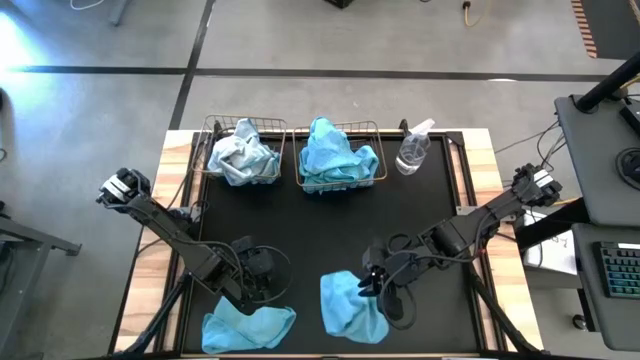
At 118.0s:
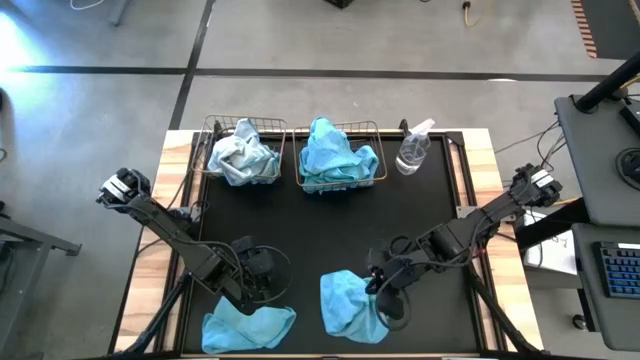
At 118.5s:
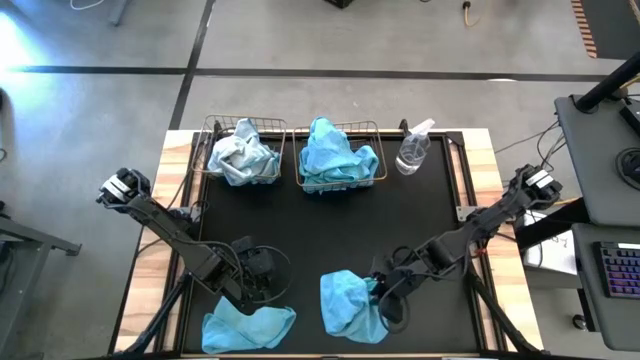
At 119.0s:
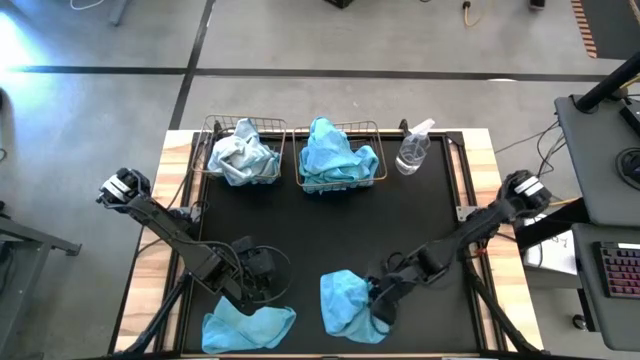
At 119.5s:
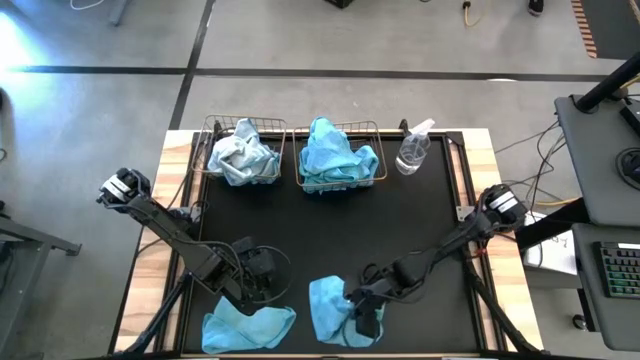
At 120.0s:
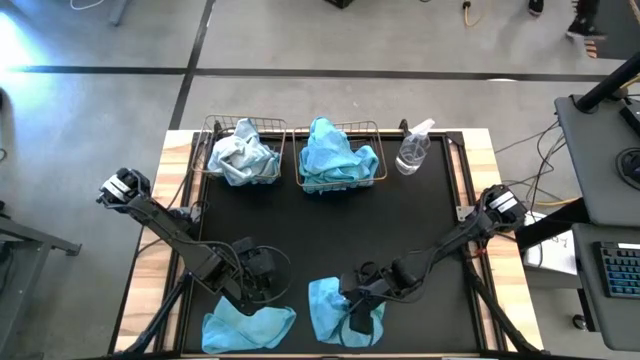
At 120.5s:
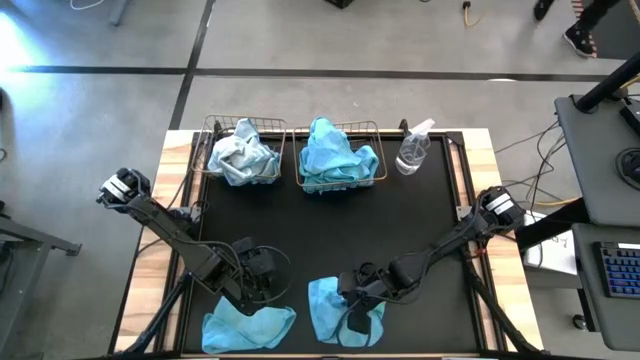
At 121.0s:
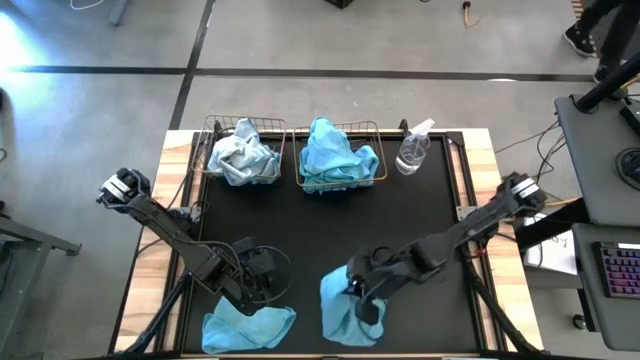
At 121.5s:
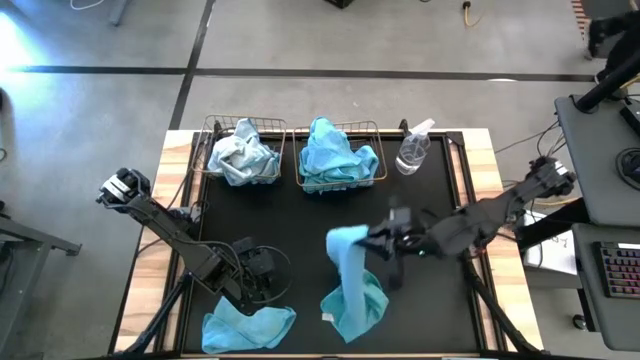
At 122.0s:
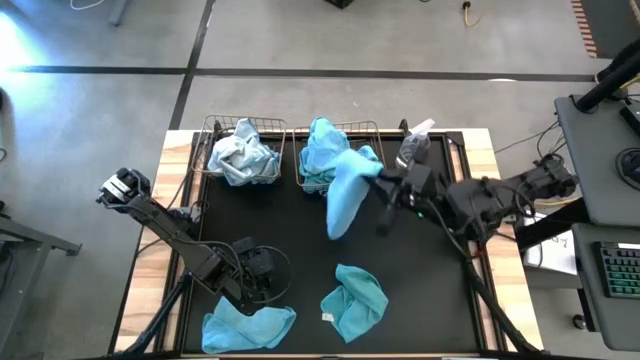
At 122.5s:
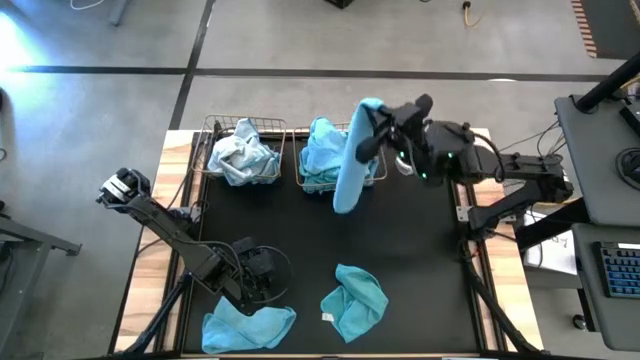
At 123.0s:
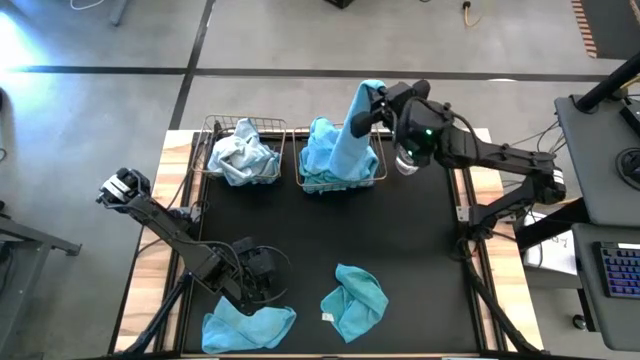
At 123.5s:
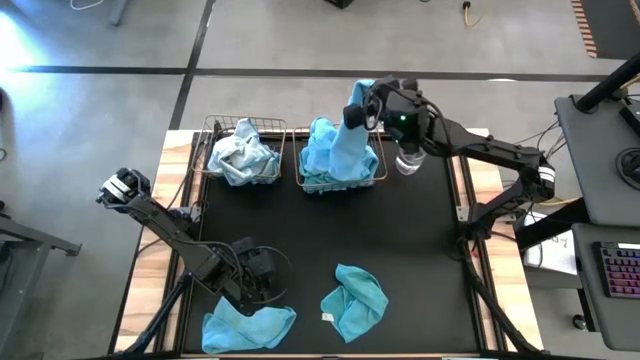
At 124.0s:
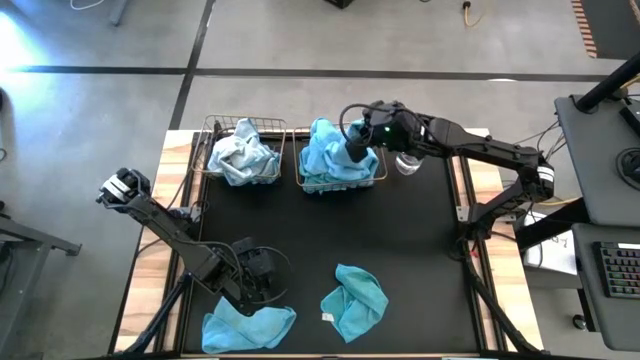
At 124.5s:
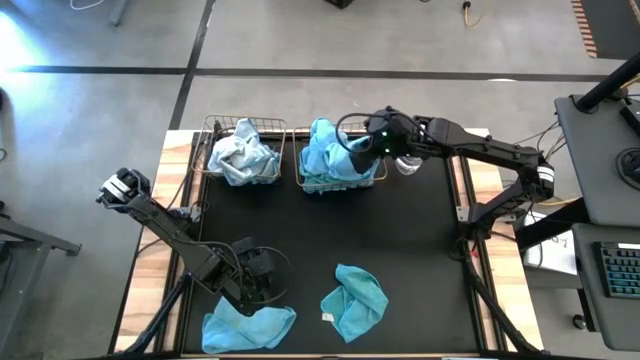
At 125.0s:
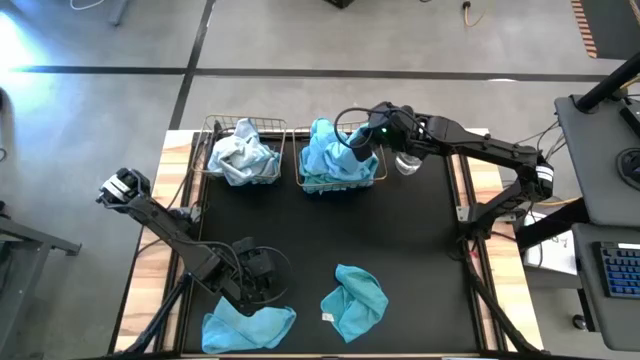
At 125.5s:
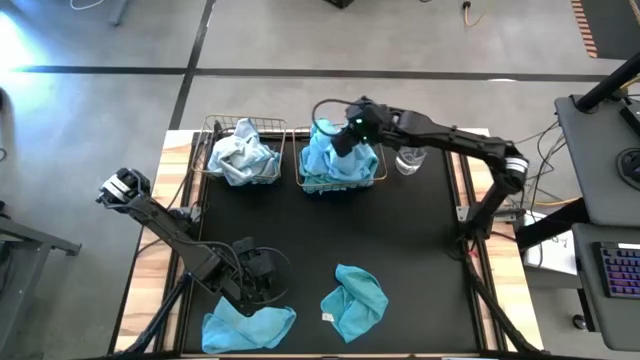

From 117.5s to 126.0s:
Task: Sort microfiber towel by color & place in baskets
Put the blue microfiber towel into the right wire basket

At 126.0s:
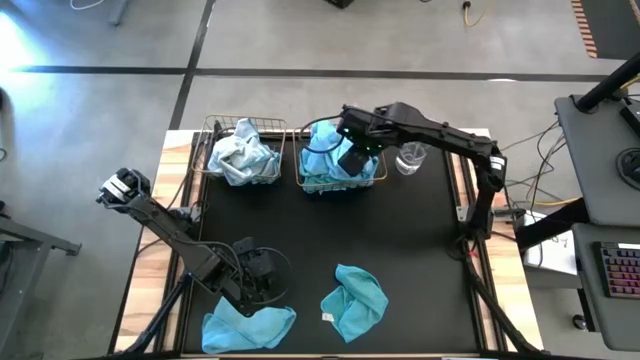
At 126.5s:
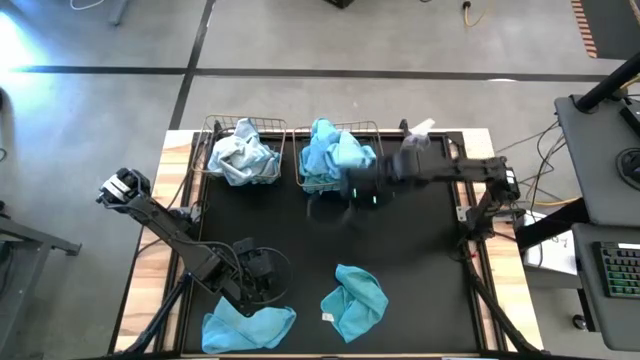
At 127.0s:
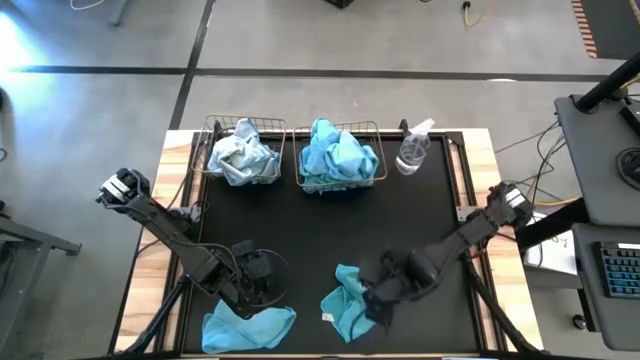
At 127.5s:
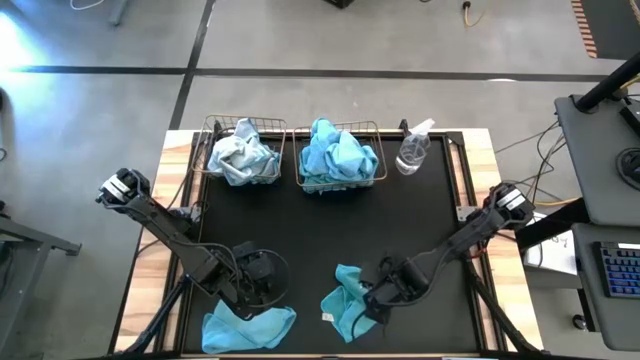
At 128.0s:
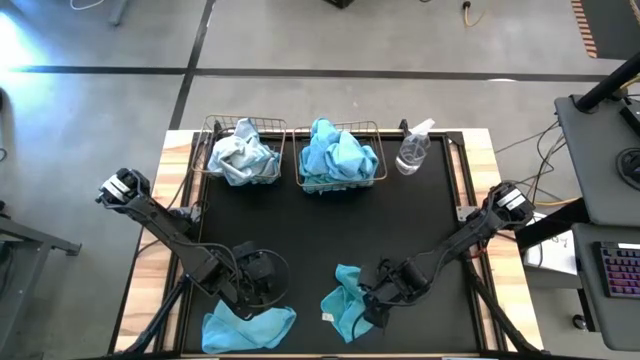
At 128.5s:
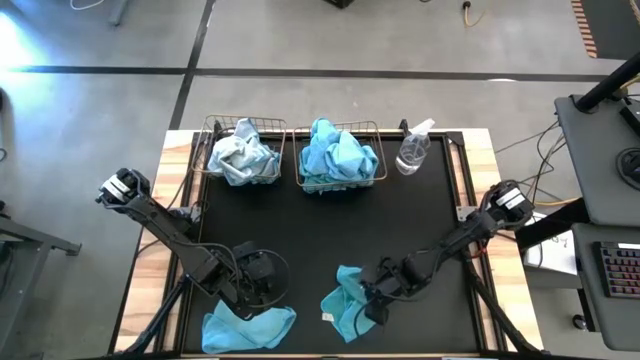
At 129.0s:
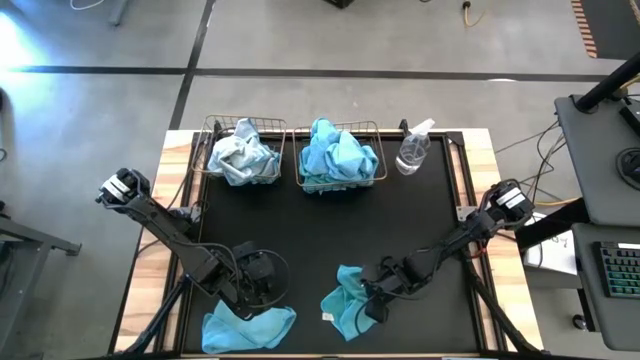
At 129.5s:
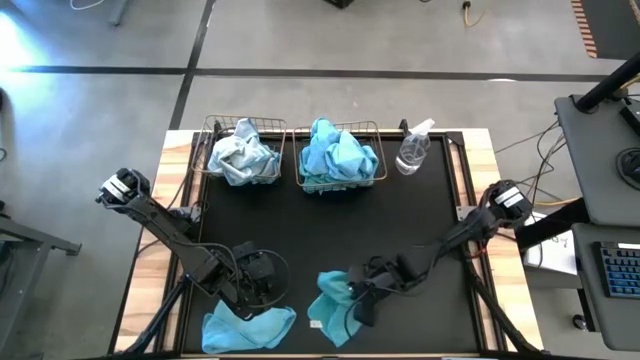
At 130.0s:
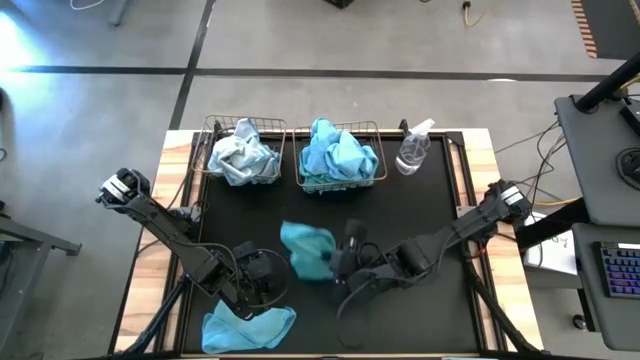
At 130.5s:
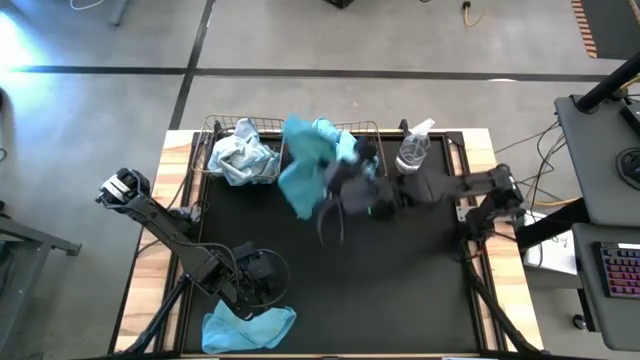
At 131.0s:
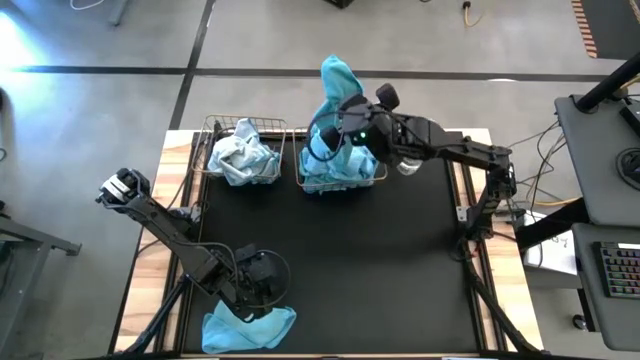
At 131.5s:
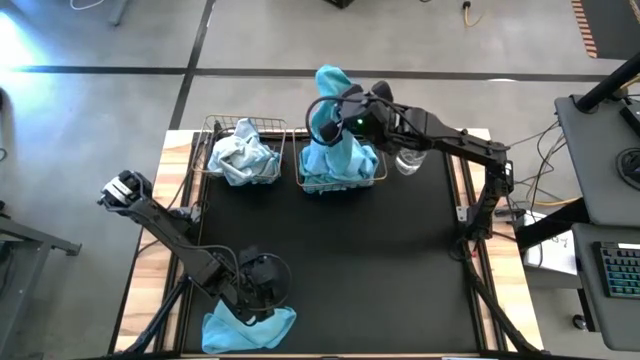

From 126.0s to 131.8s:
Put the blue microfiber towel into the right wire basket

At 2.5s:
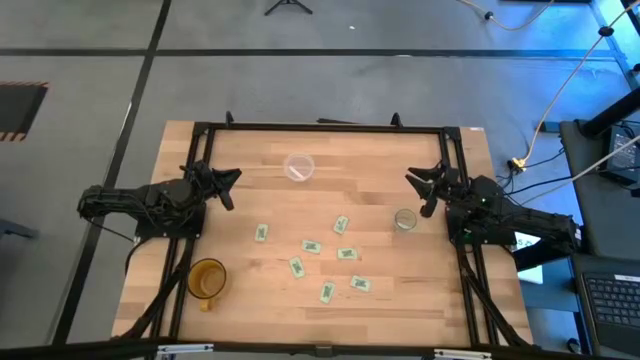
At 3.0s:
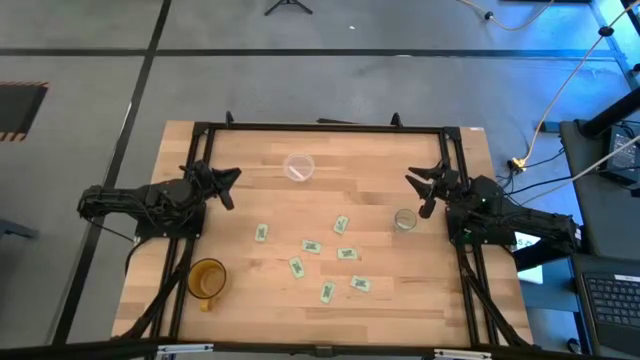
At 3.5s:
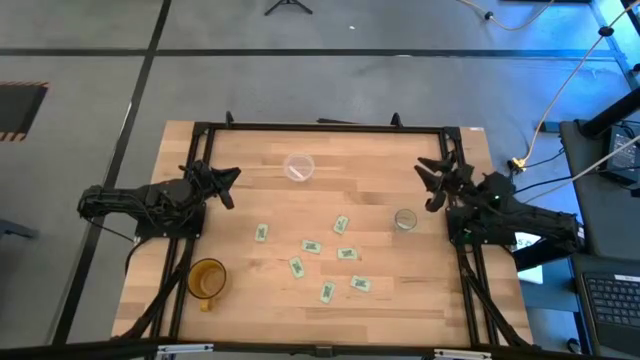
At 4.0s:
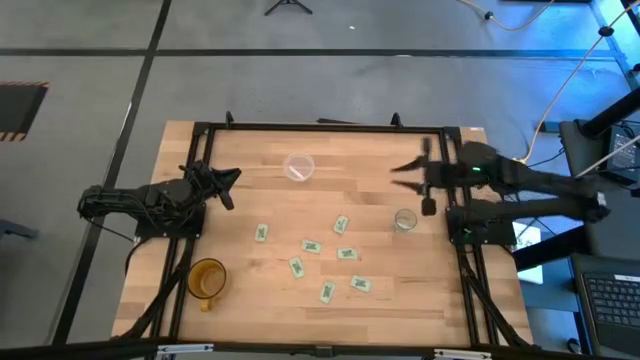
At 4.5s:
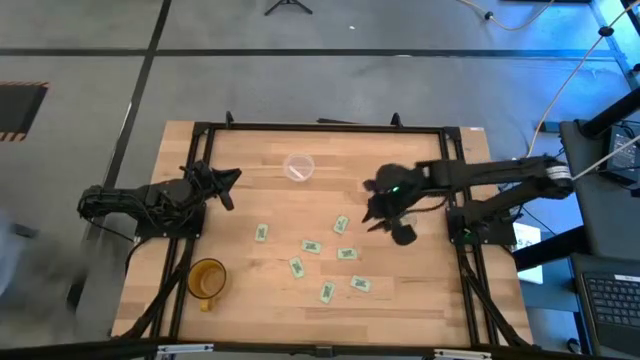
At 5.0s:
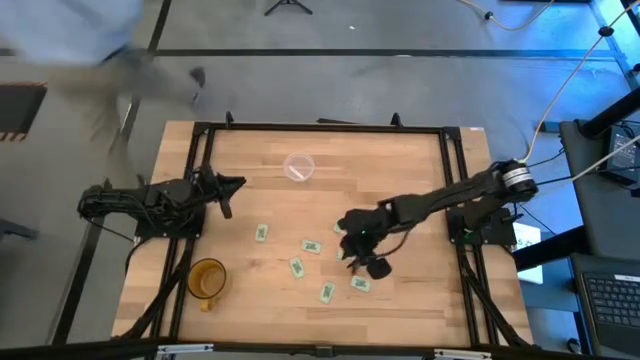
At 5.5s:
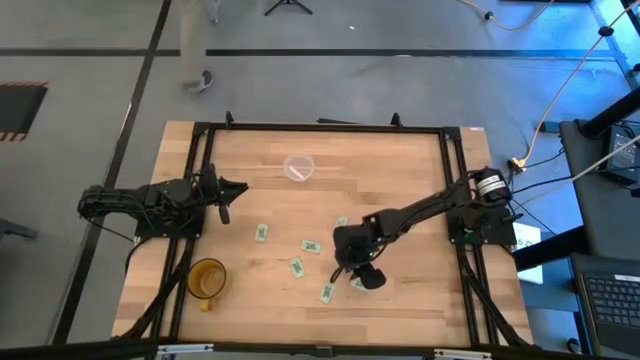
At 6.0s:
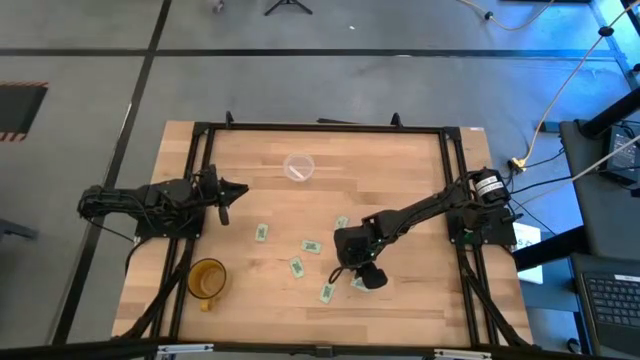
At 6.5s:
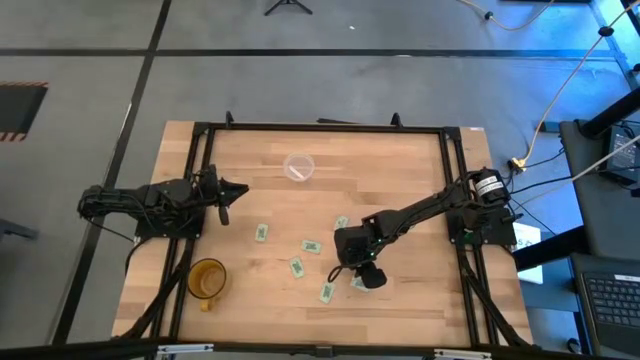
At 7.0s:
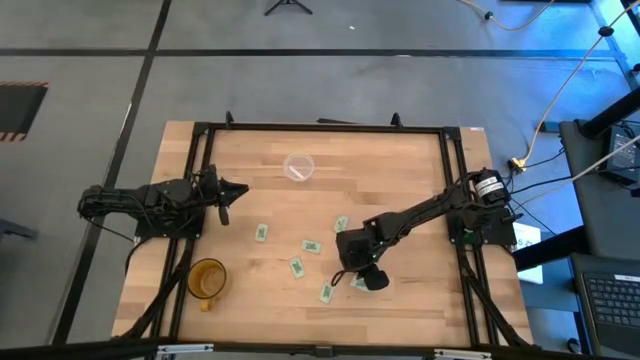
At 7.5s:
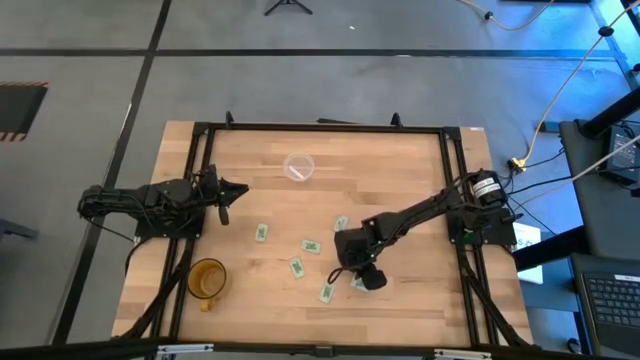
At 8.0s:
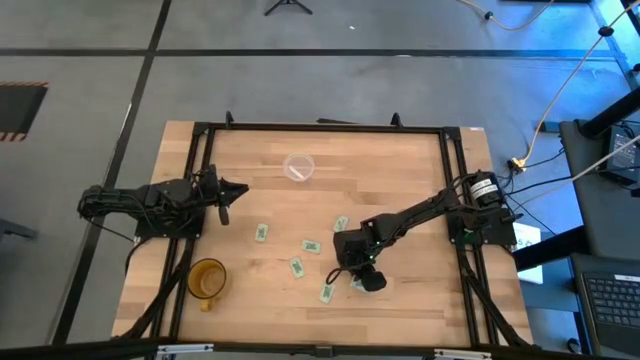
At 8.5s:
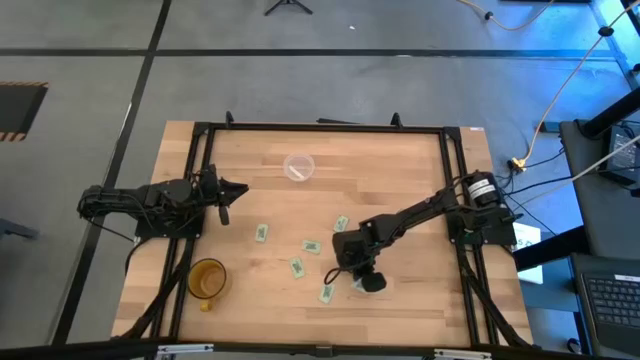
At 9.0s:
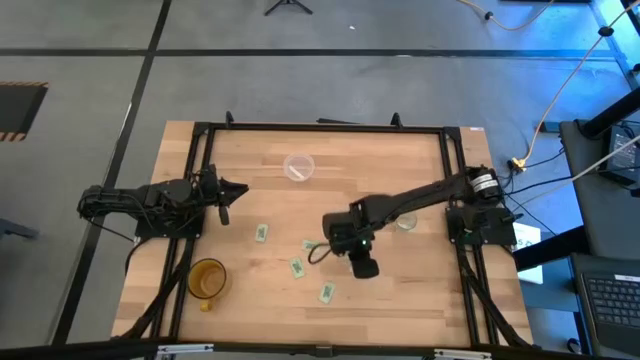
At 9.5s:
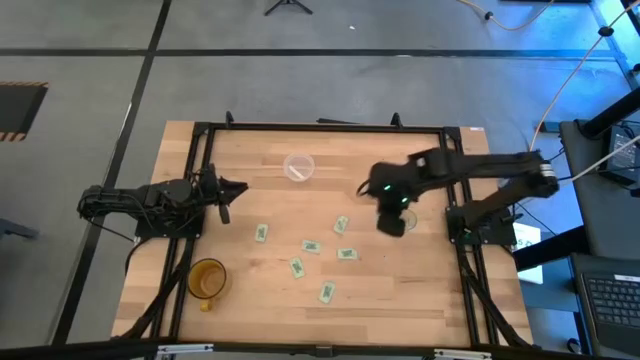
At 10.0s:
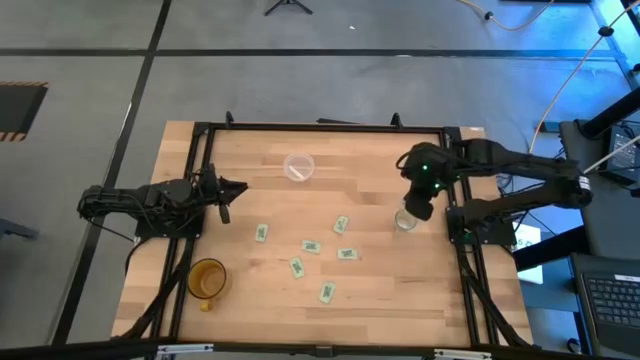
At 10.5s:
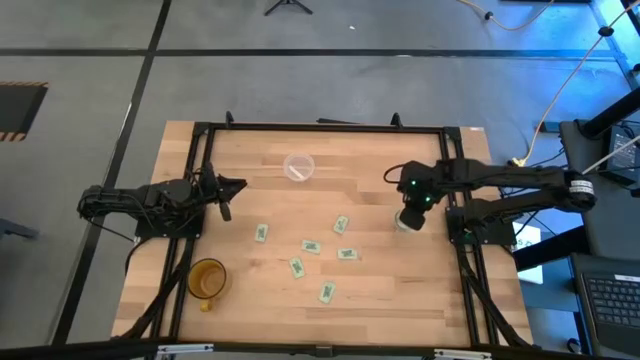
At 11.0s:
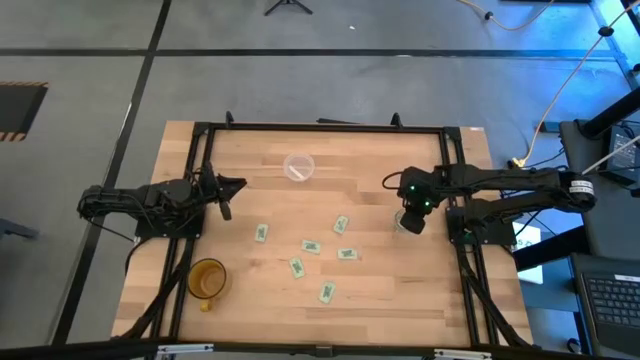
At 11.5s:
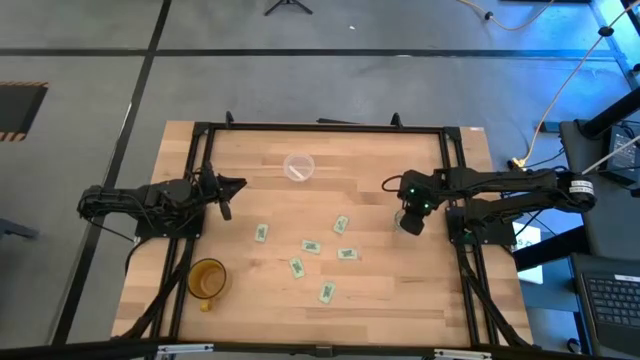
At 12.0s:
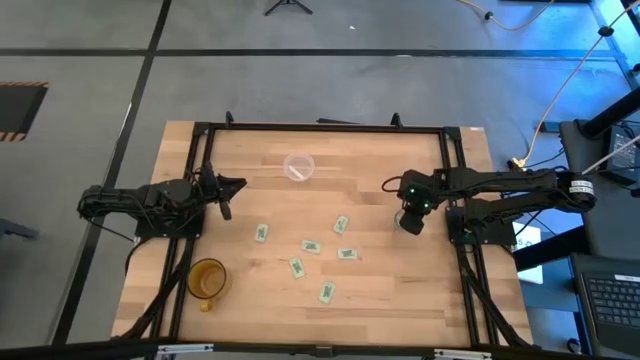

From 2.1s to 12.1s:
Task: Pick and place Stevia / Truvia into bins
Put the stevia packet into the transparent container
